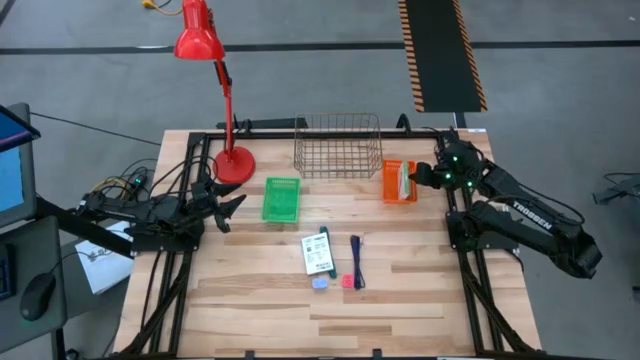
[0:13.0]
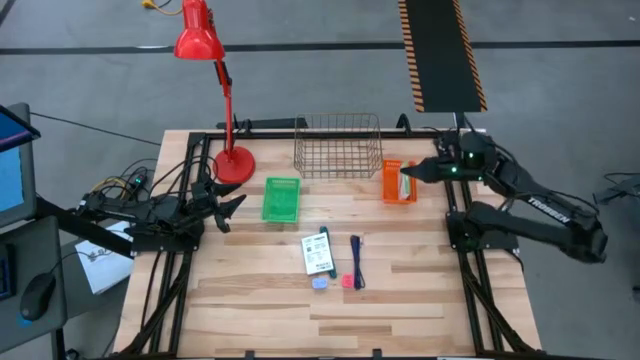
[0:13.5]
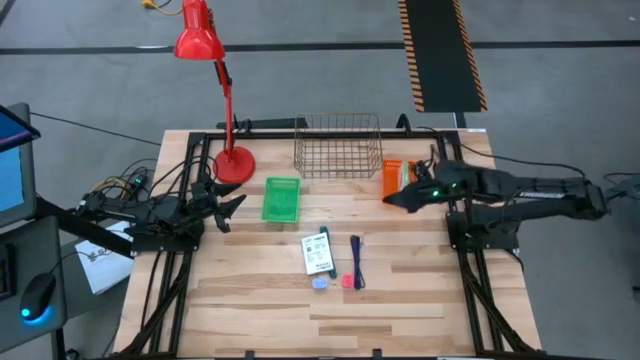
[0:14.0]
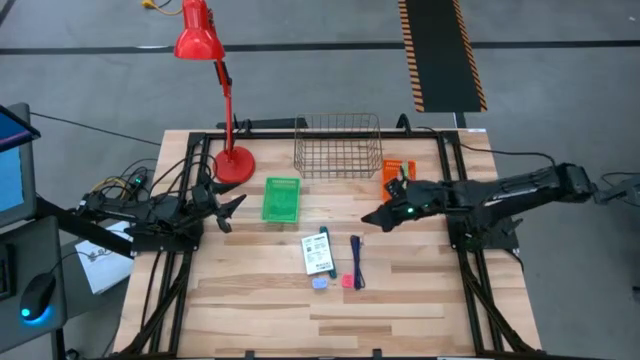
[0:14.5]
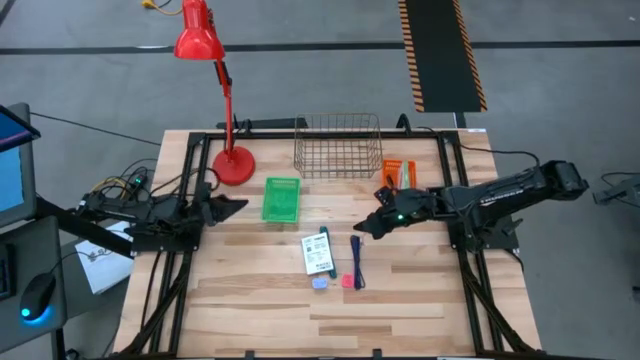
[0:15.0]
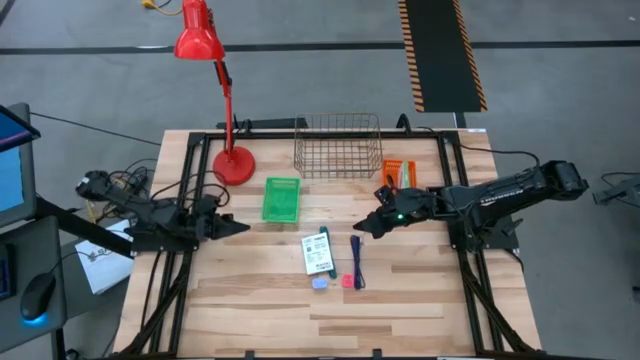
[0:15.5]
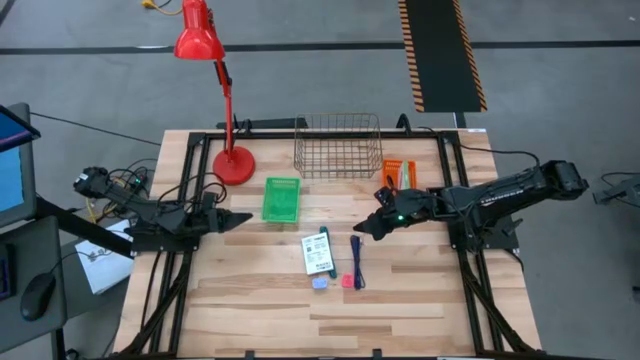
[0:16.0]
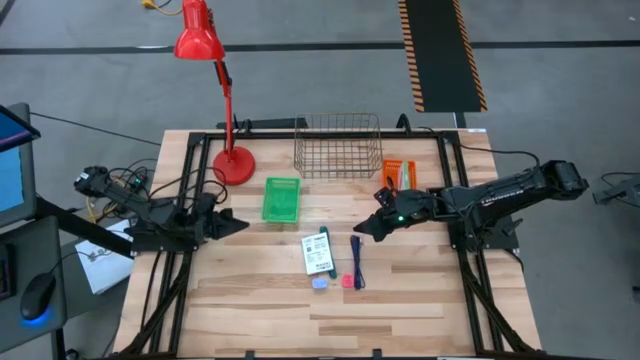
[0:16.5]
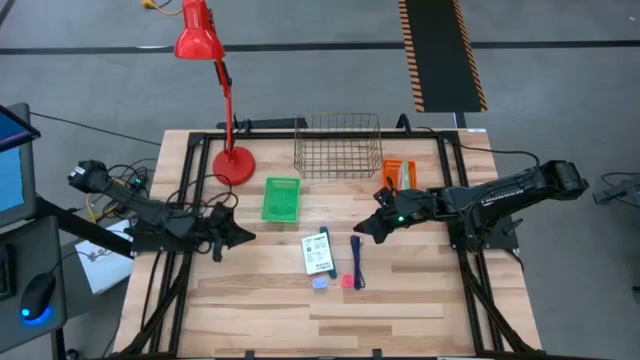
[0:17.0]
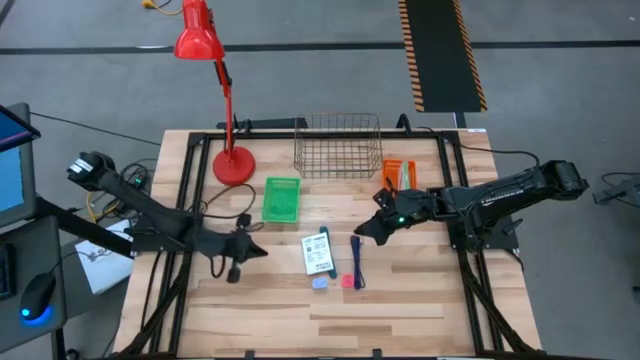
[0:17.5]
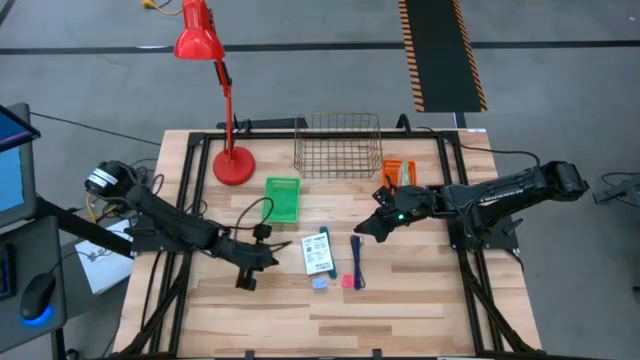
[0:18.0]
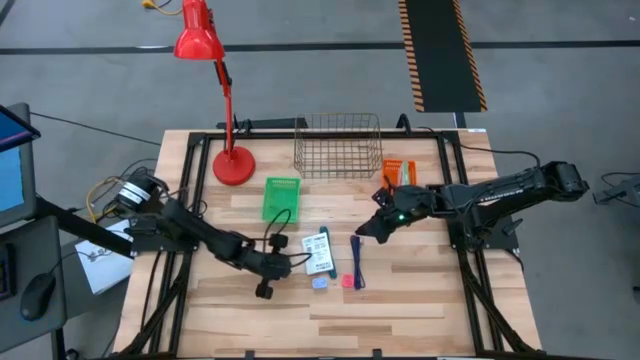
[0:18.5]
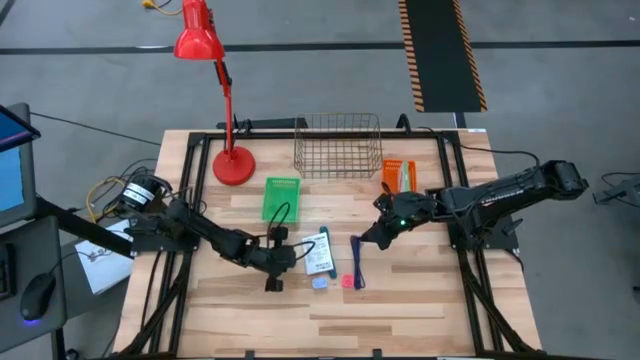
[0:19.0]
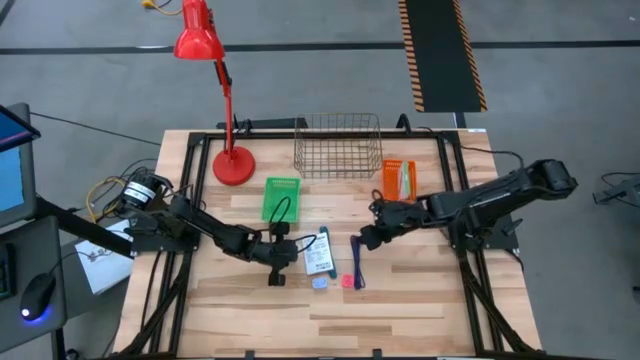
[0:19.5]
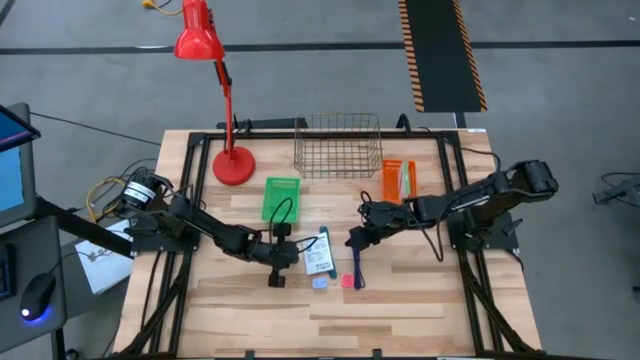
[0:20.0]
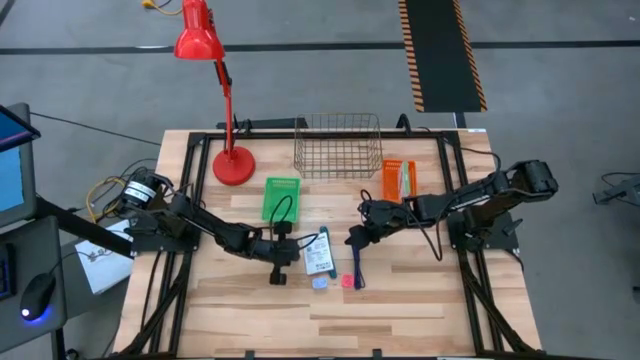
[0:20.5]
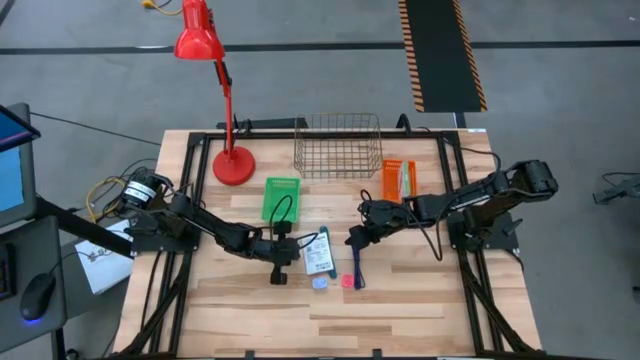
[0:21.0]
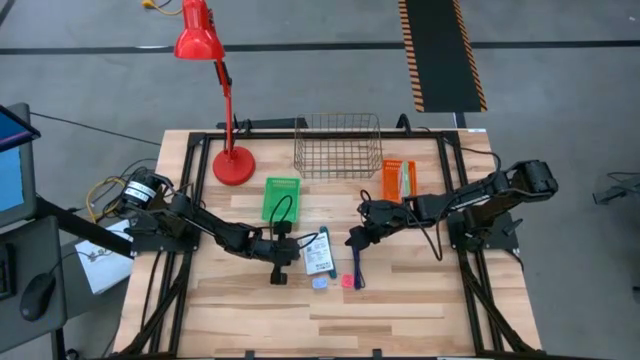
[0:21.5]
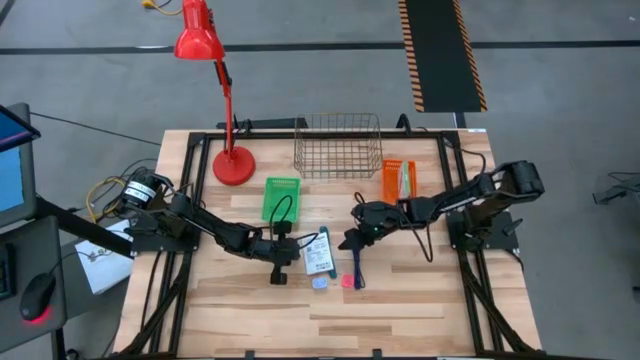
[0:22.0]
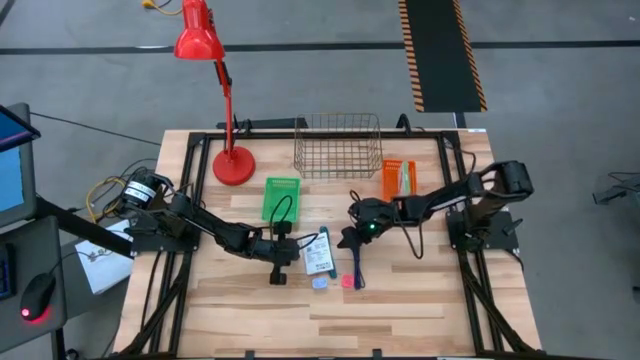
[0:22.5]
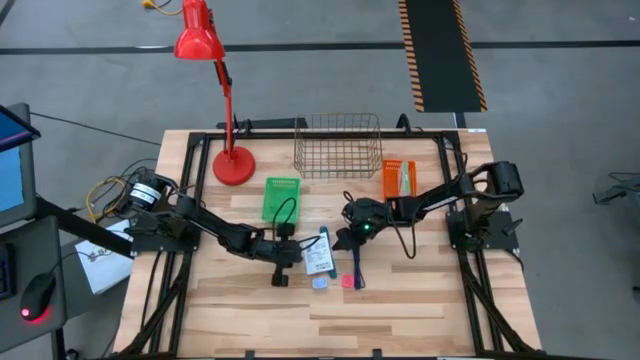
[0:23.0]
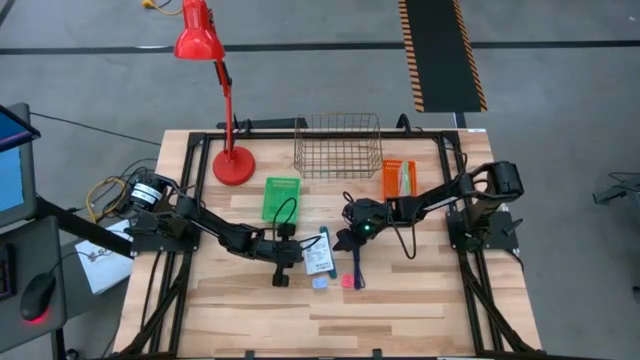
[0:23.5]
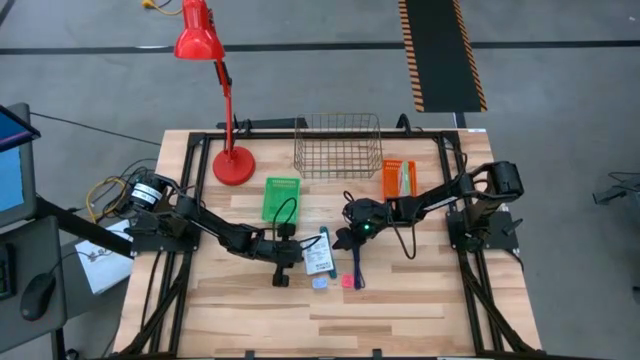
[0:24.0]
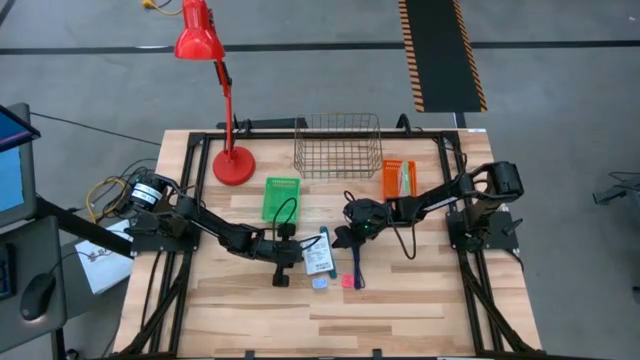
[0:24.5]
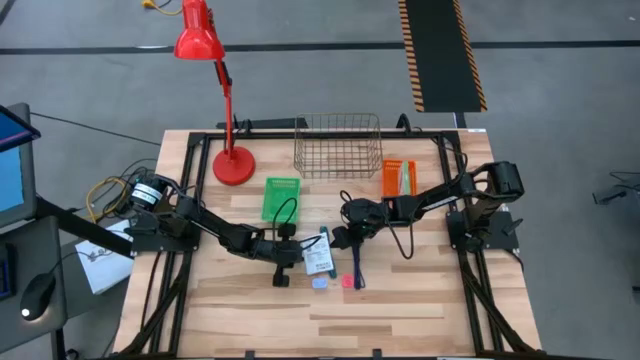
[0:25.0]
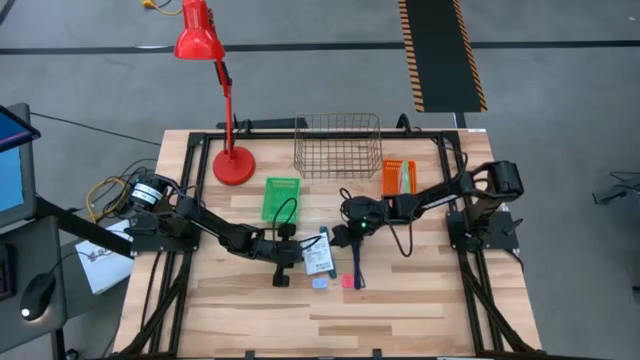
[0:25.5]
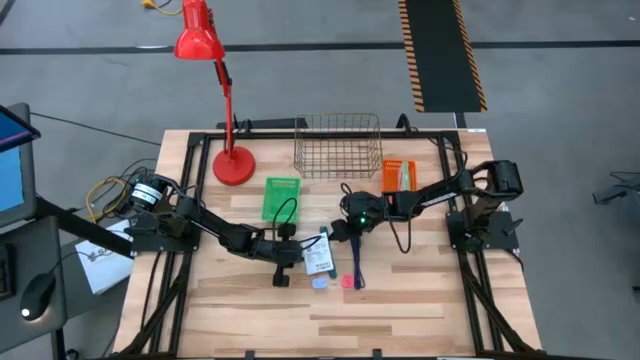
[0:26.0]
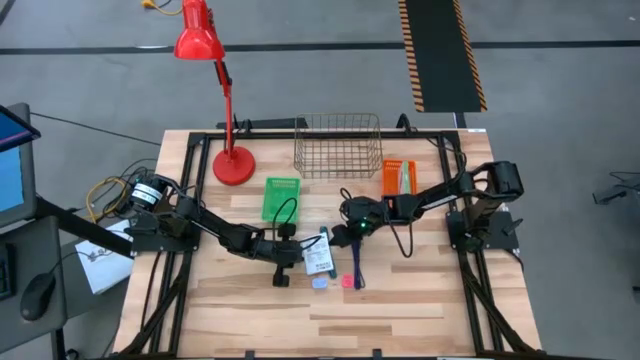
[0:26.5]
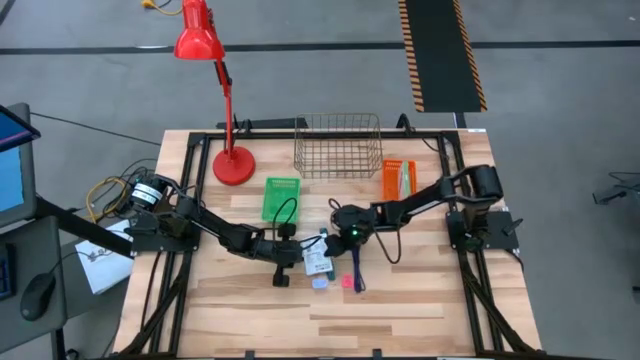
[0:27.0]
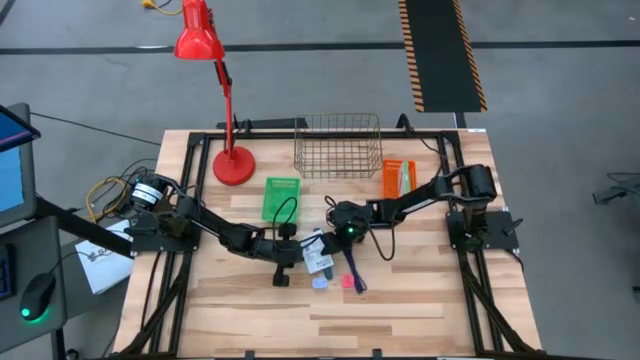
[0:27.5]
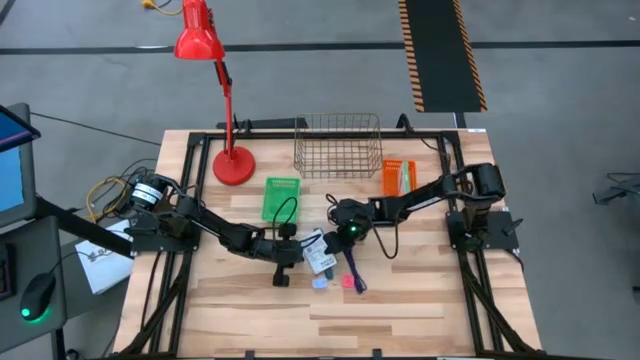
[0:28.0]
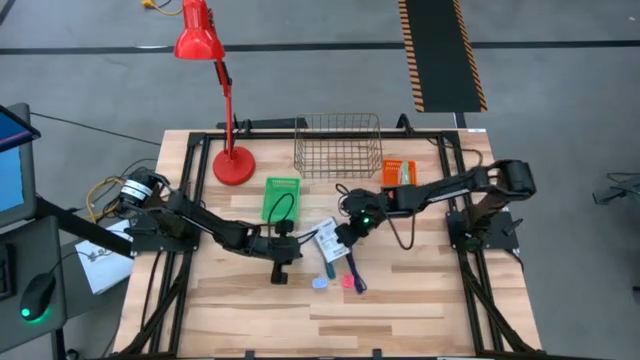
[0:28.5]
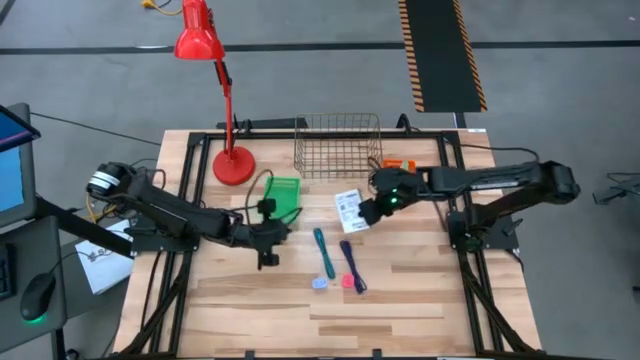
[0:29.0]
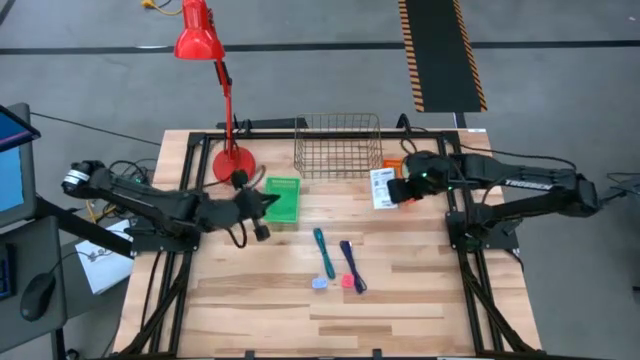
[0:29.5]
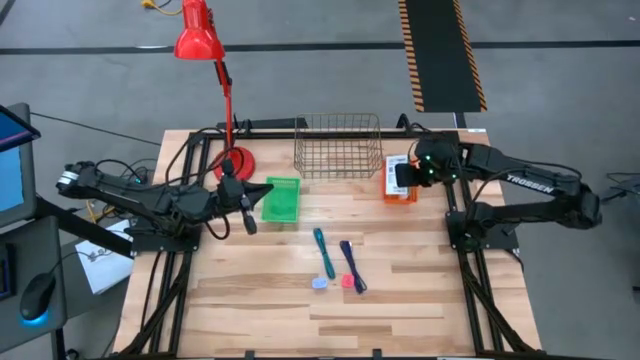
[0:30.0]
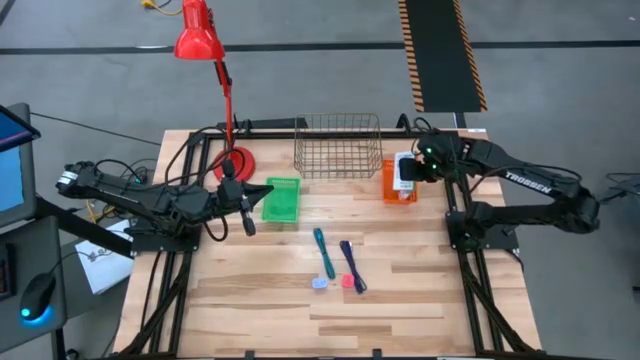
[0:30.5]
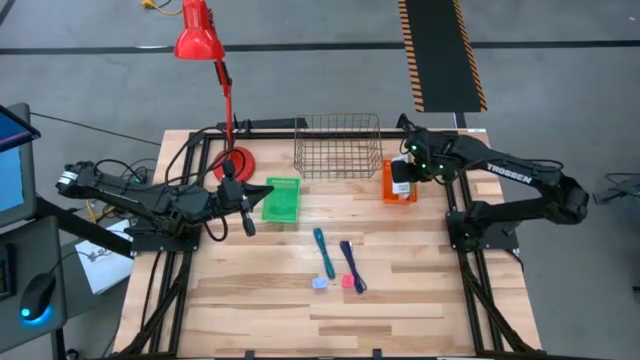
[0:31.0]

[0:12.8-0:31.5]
Task: Pick and place items into bin
Put the white card reader box into the orange basket
